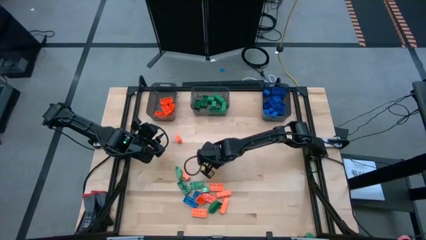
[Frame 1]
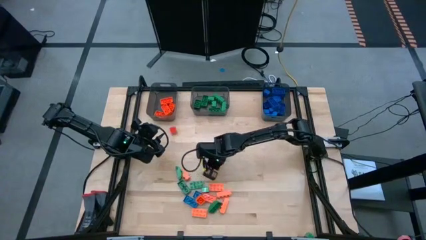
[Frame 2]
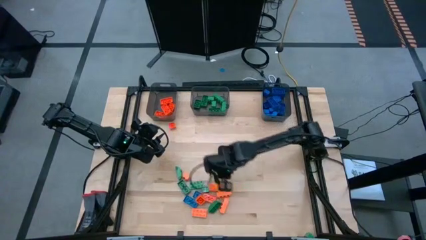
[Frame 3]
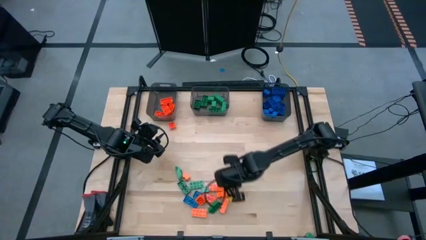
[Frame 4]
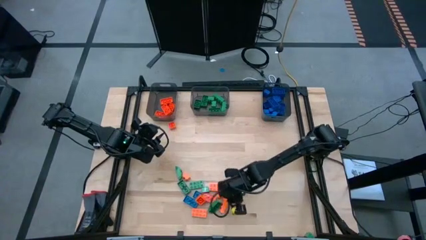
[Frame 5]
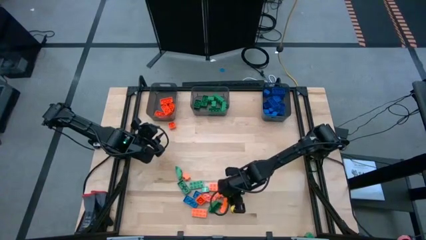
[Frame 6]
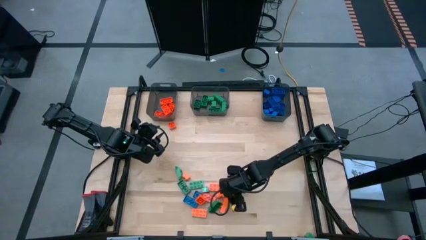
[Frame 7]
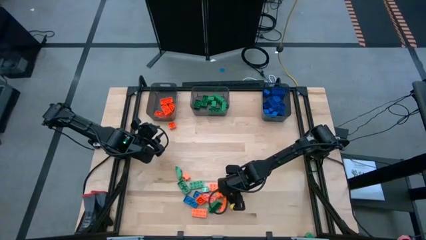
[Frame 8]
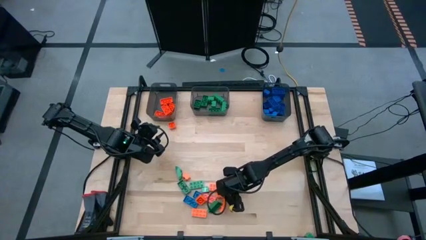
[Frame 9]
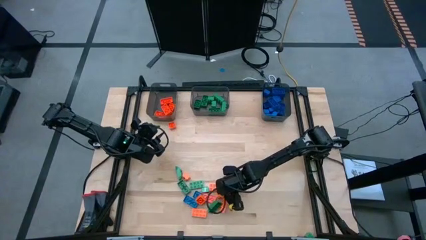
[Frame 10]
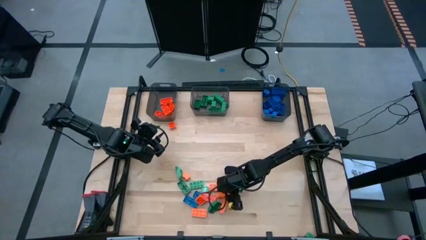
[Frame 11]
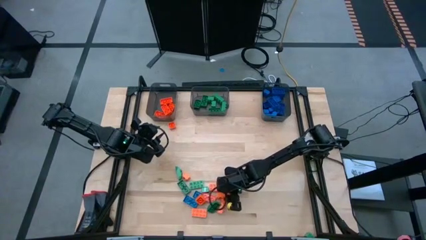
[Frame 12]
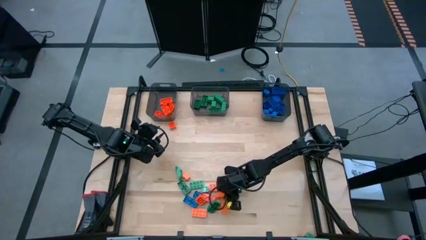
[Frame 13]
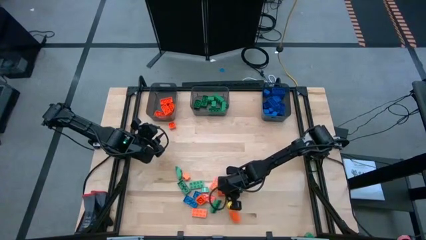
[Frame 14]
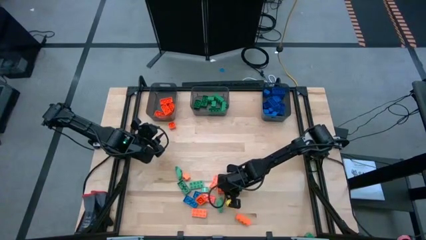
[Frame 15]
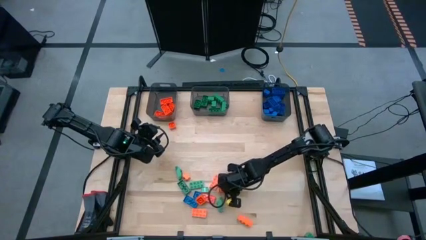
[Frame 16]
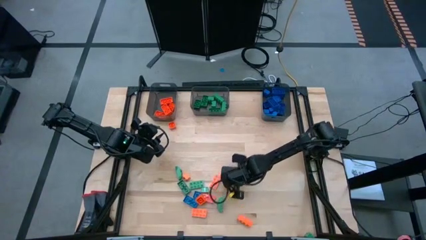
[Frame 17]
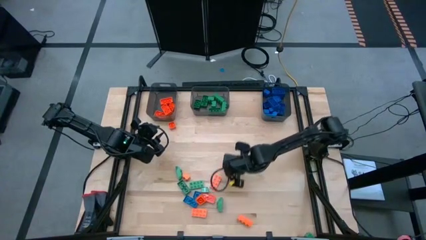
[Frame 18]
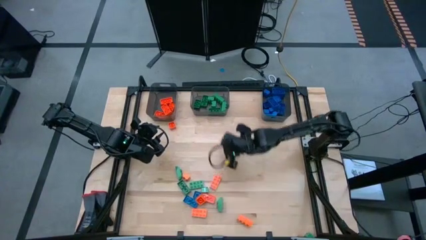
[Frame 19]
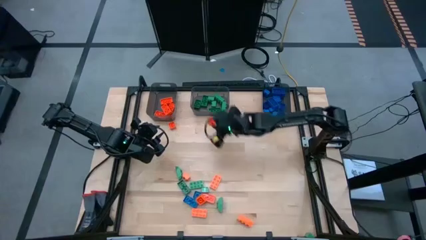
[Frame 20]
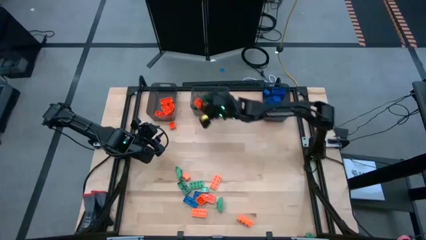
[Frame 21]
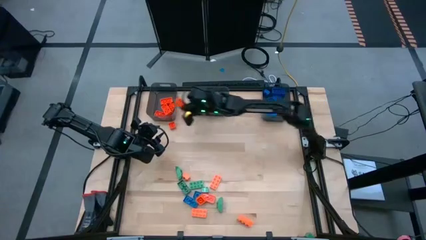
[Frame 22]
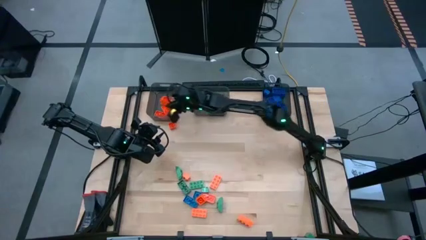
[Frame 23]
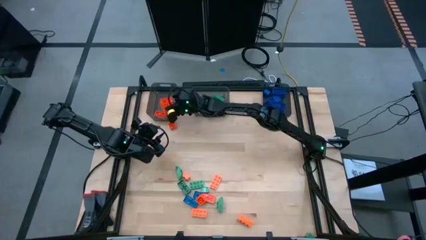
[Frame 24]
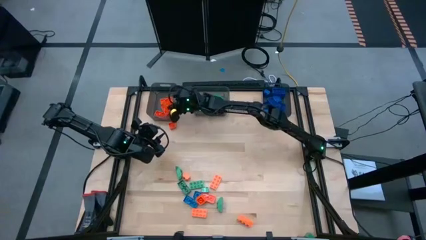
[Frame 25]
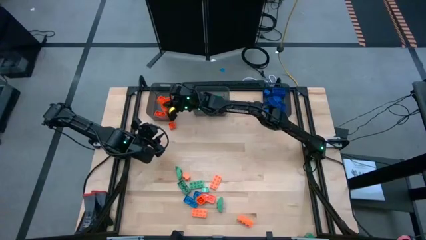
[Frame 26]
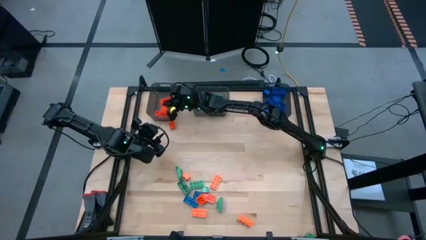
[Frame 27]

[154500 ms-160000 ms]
Task: Sort blocks
Put the orange game piece into the left black bin

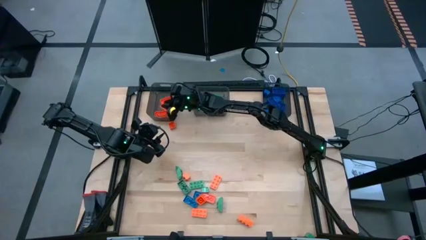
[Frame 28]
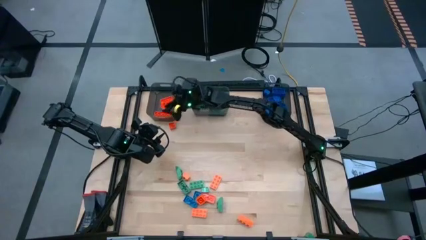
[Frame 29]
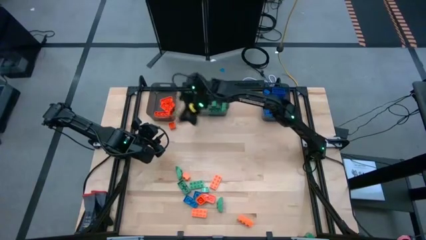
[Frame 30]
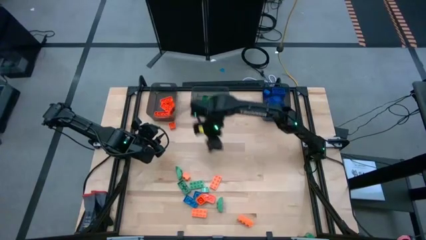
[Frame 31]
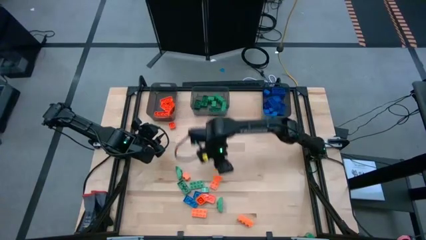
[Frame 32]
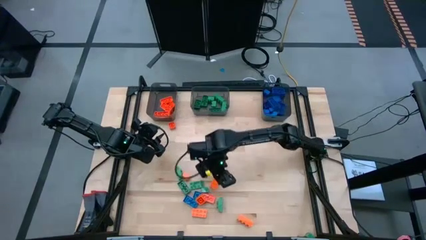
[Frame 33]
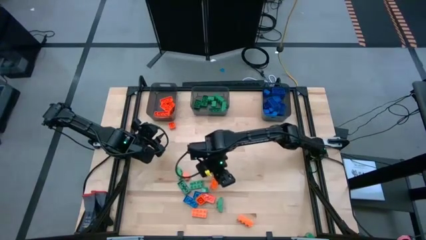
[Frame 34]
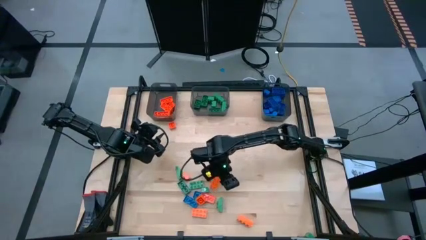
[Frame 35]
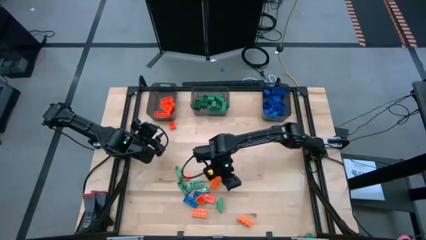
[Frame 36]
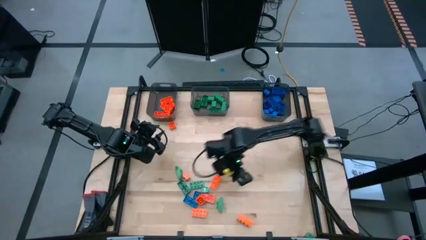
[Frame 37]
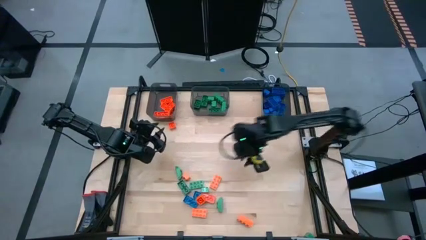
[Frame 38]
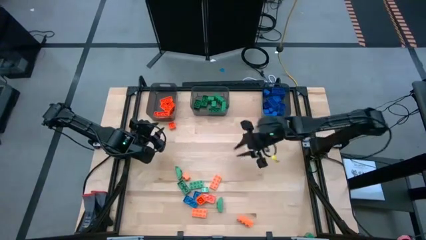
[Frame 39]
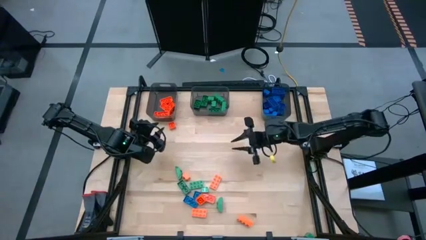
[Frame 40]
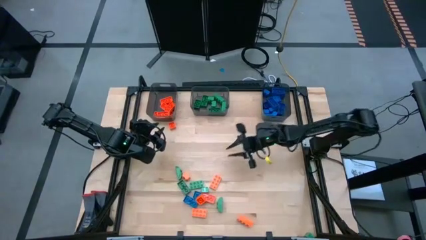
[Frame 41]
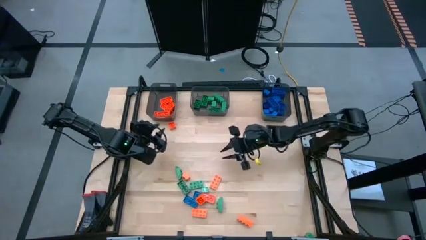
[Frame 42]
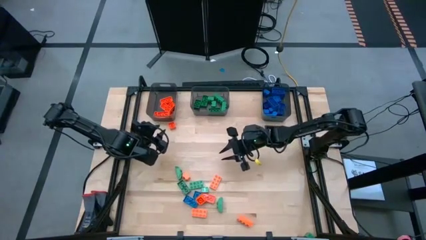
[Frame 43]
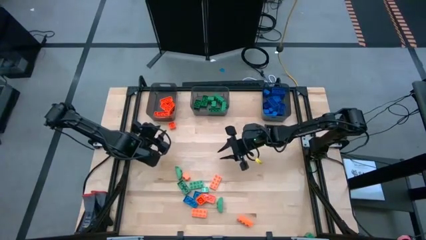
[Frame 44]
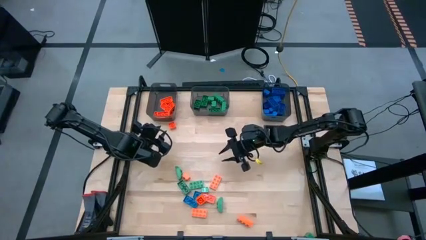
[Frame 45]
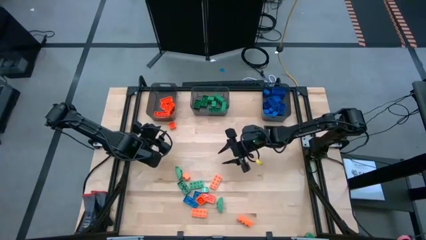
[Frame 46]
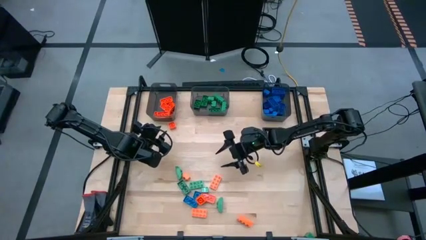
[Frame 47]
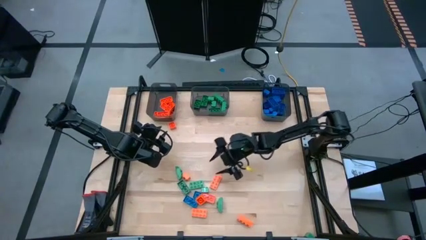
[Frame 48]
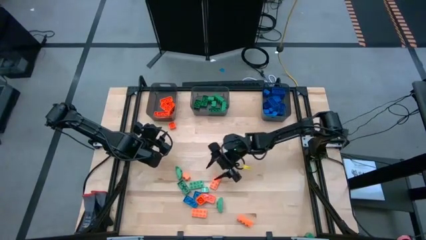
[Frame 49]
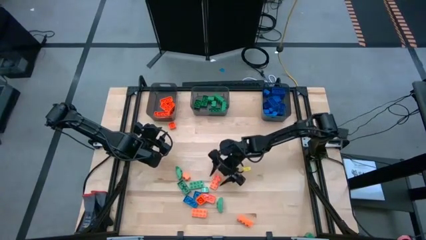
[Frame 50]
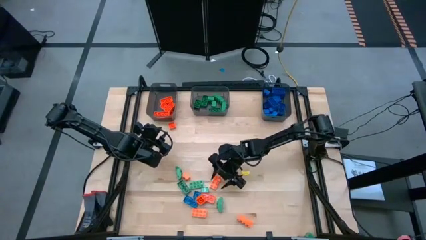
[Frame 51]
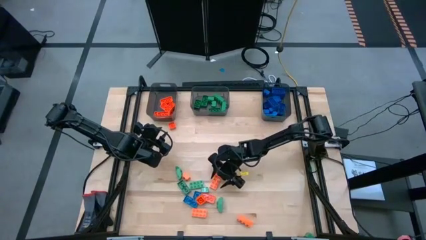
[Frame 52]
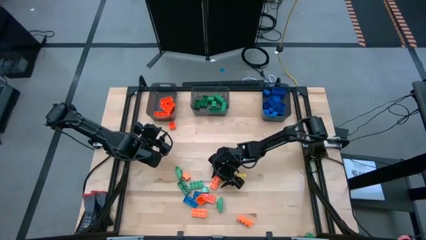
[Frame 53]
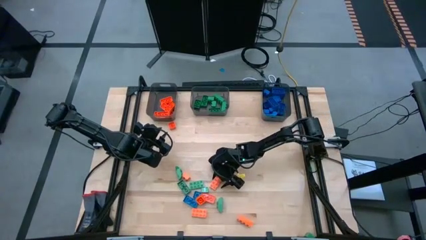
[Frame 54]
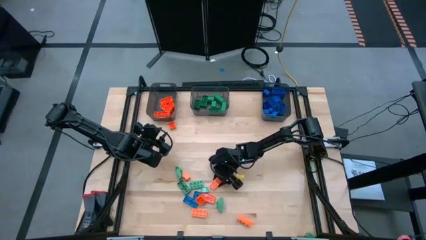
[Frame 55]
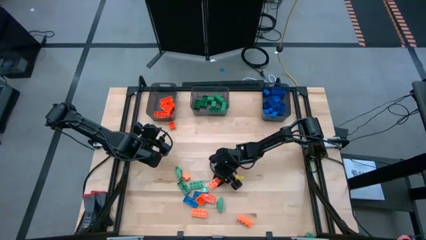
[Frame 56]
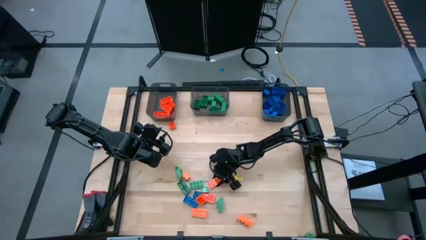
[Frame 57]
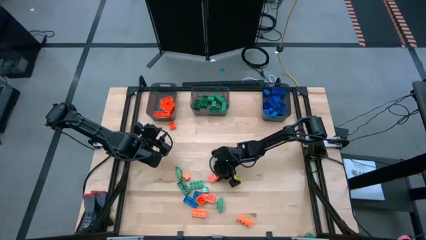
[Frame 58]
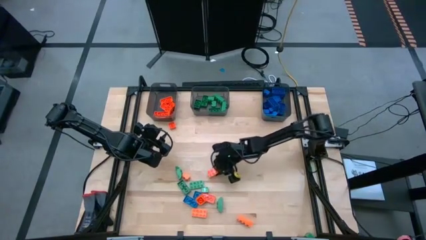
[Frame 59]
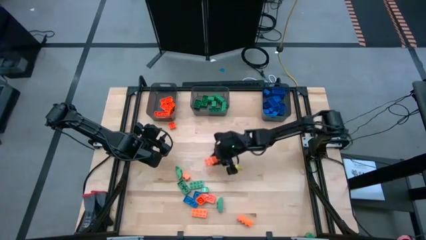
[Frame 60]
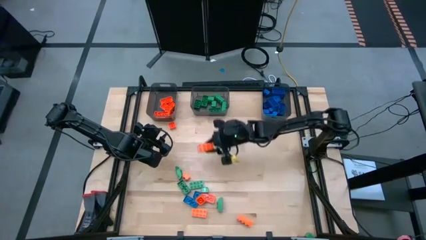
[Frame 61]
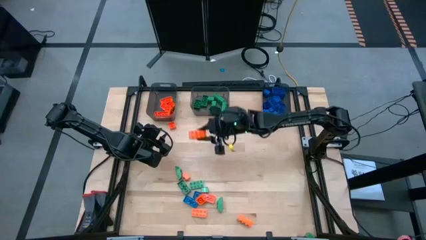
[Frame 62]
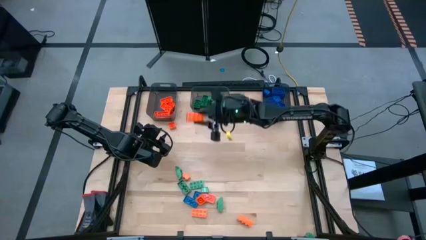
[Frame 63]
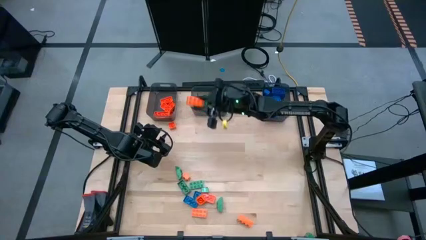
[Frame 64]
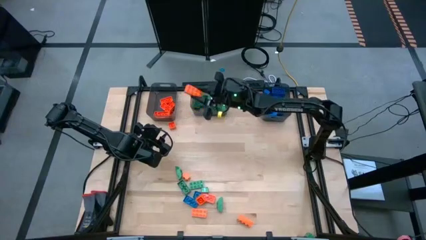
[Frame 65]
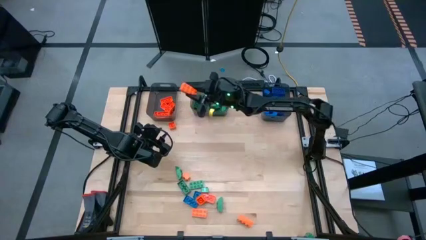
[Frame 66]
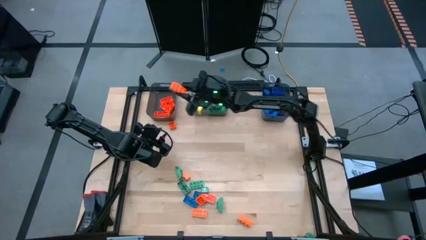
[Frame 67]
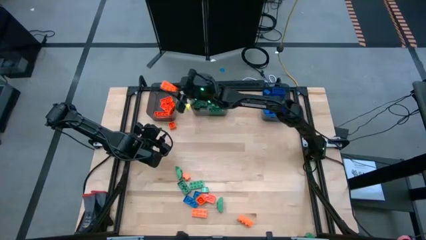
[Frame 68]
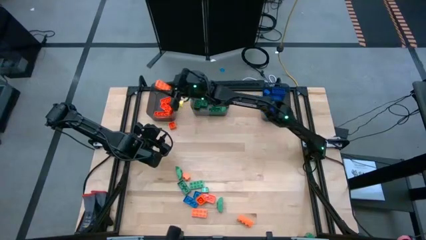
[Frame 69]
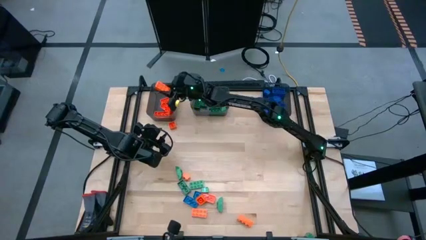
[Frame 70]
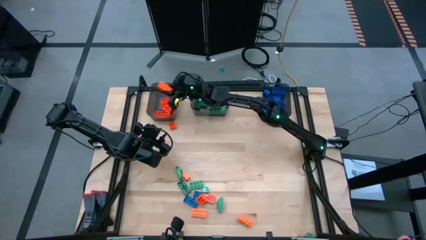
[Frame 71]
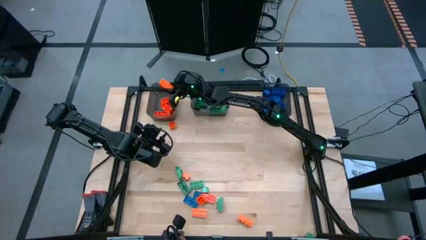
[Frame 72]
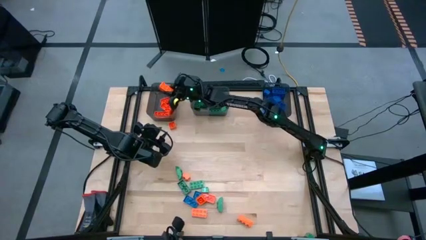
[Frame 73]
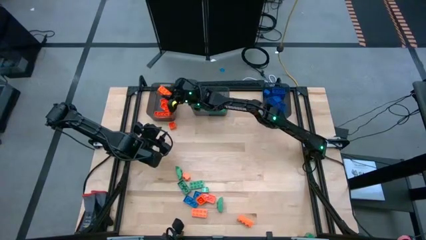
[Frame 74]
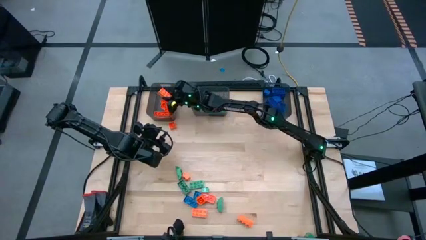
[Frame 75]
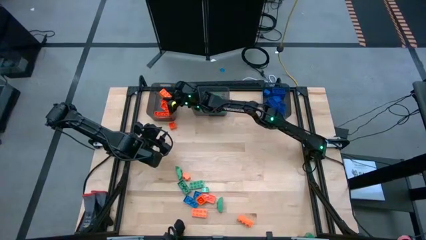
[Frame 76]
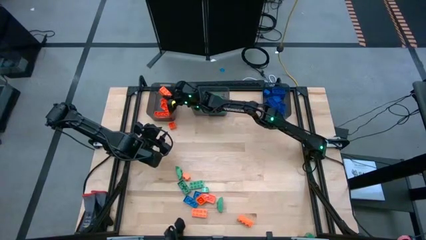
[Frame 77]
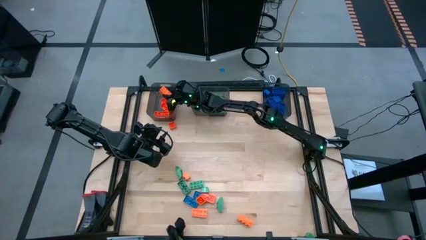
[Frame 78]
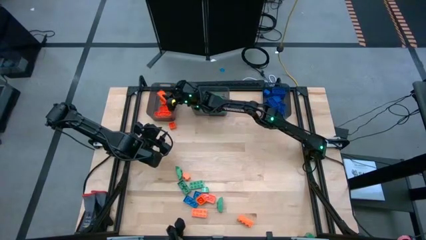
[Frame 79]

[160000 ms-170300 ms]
Put the orange game piece into the left black bin
